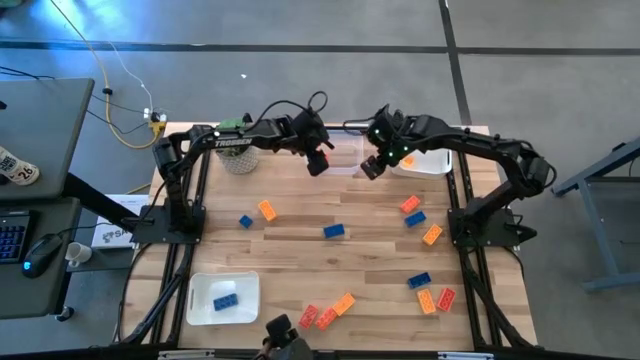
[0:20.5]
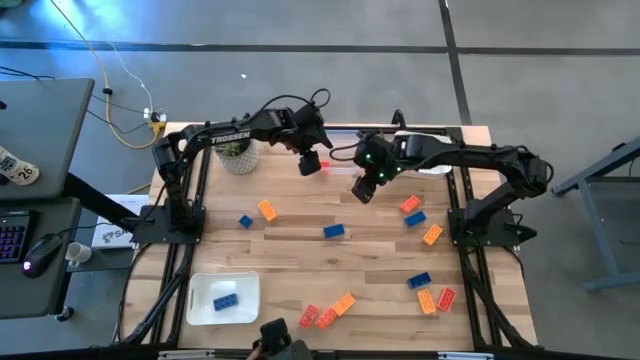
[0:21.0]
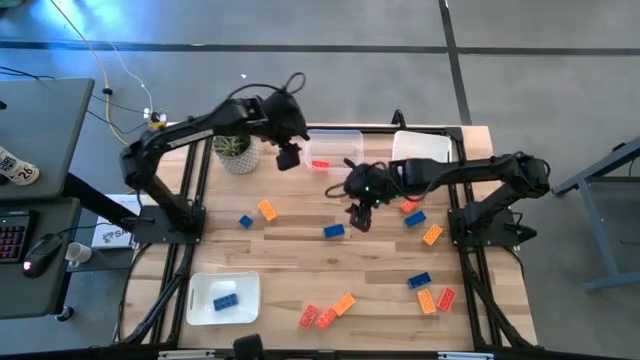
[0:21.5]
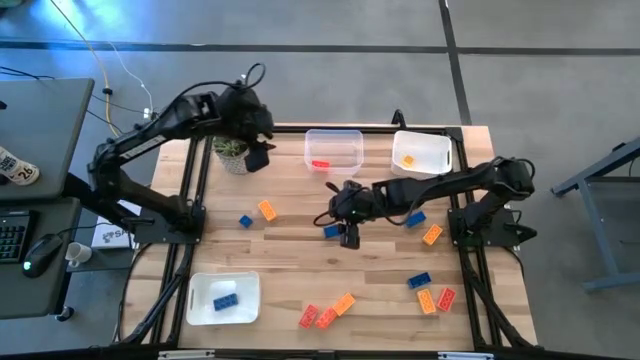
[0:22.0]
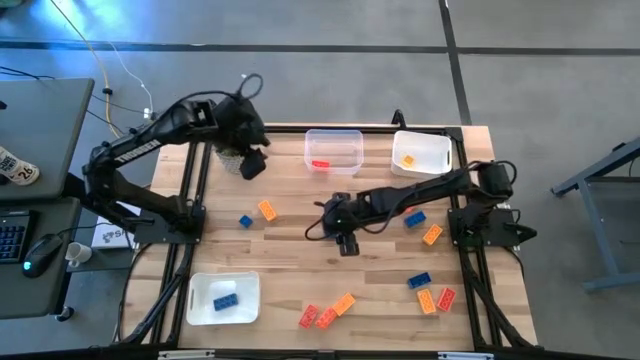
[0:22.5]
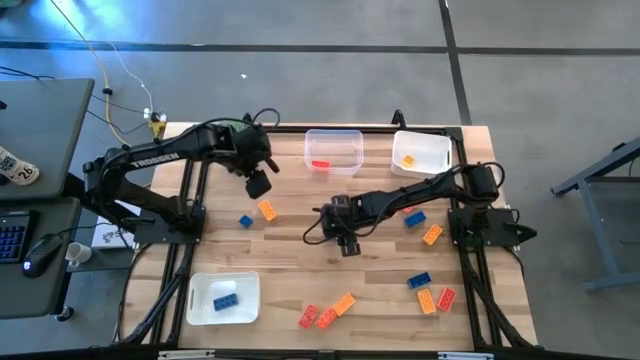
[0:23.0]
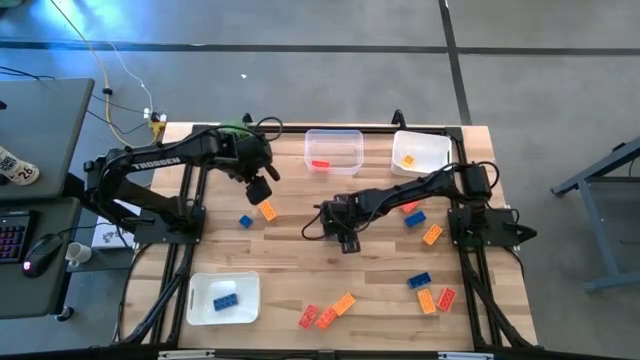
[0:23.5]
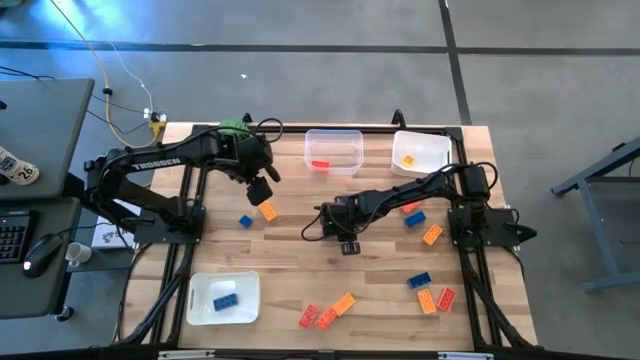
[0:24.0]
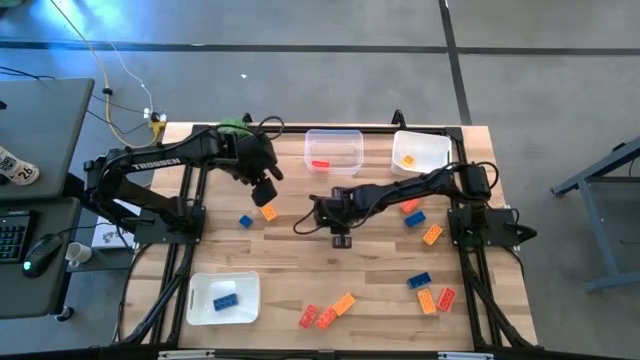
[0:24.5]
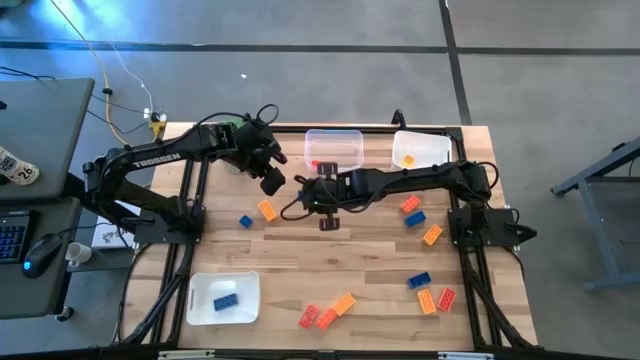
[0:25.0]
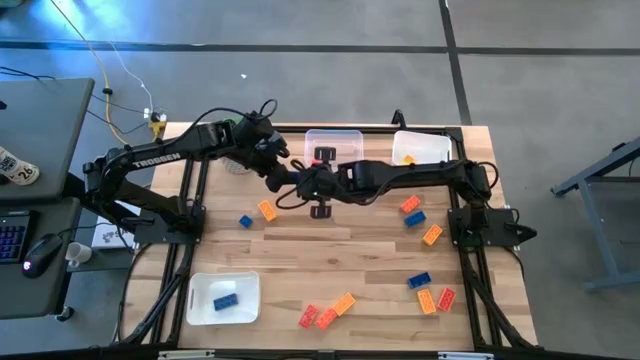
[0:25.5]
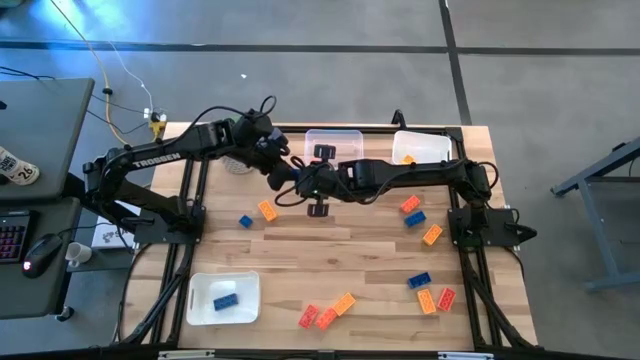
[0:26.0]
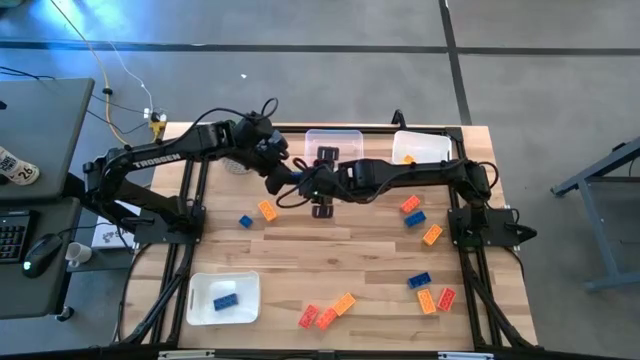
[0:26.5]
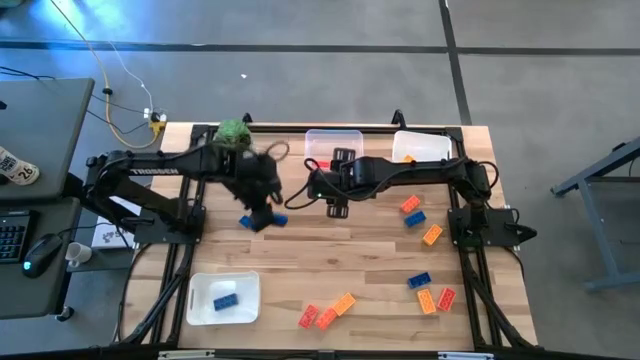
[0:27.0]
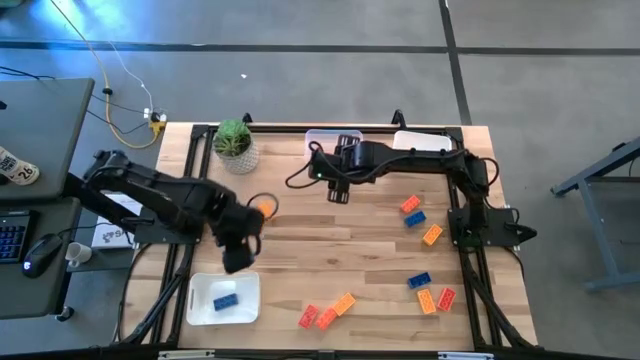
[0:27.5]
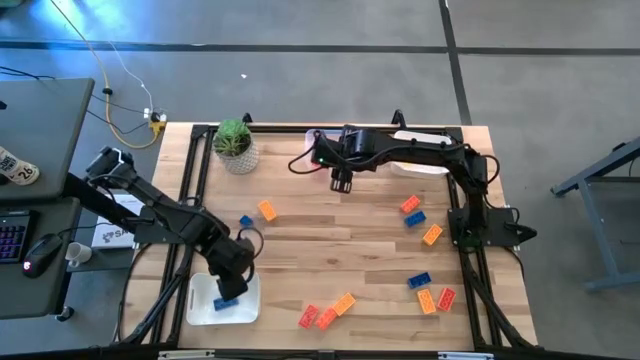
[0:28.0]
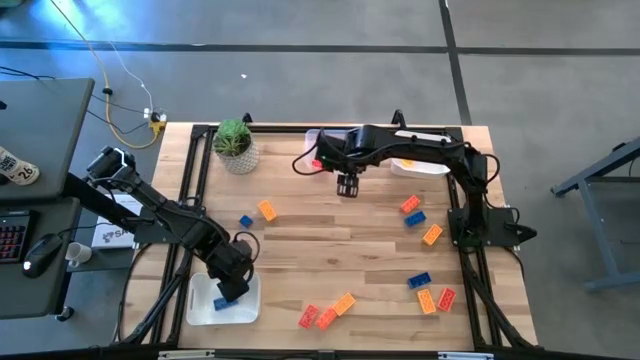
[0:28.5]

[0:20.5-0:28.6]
Task: Sort & place blocks by color
Put the blue game piece into the bottom white bin

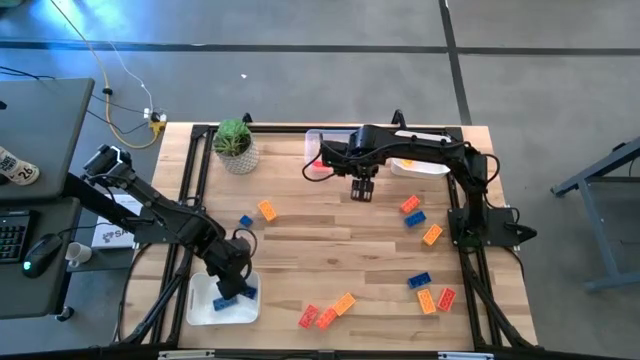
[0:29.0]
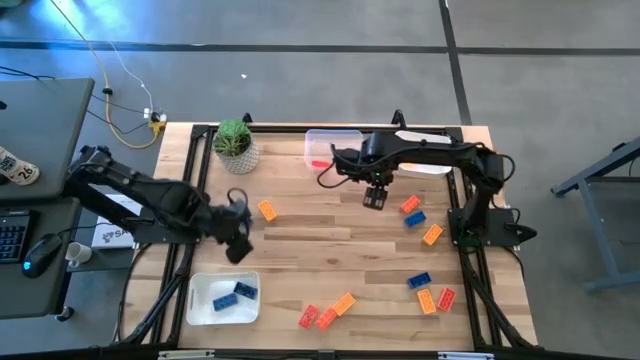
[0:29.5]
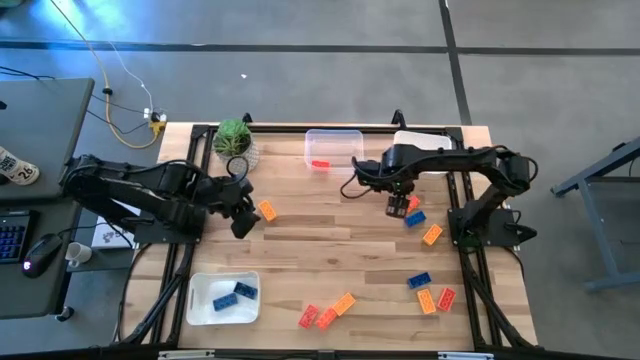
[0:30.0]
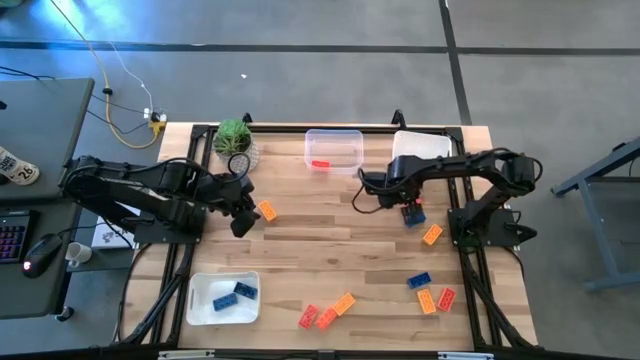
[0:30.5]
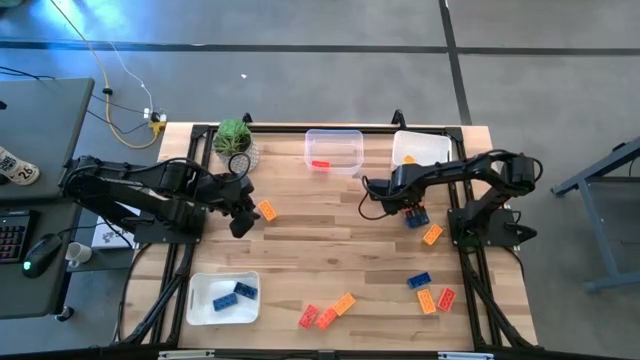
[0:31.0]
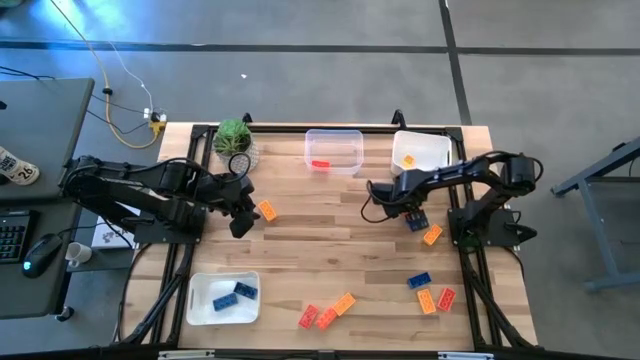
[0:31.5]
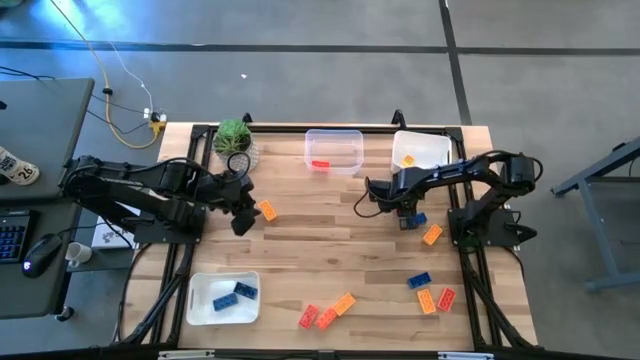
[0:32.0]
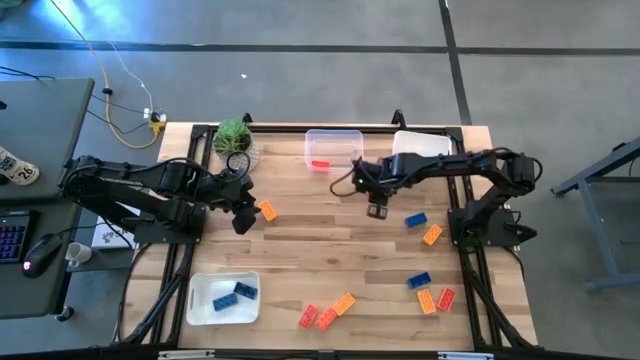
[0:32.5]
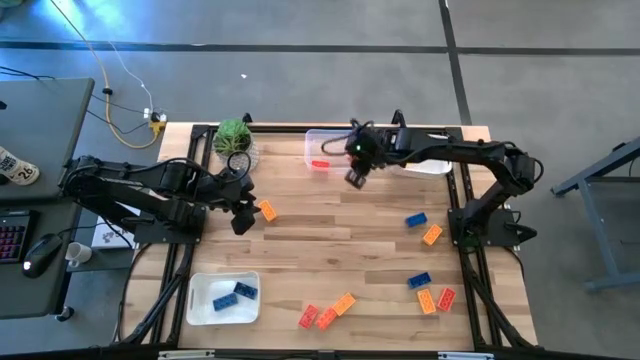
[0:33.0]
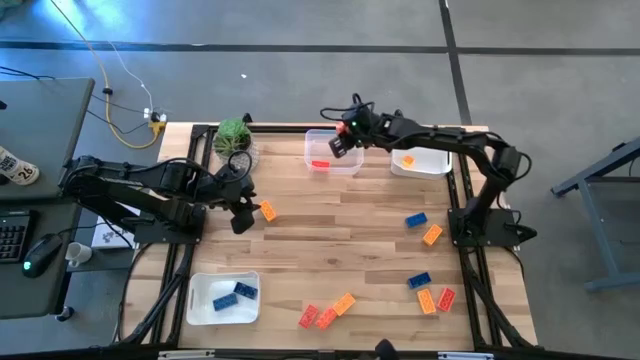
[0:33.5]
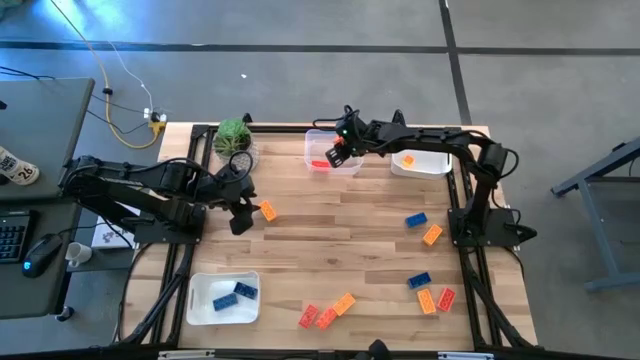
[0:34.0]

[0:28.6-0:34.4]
Put the orange game piece into the transparent bin

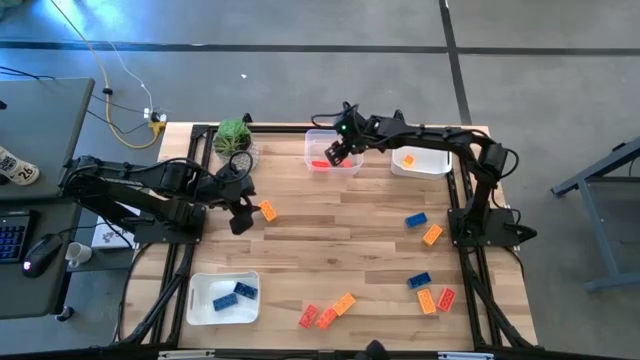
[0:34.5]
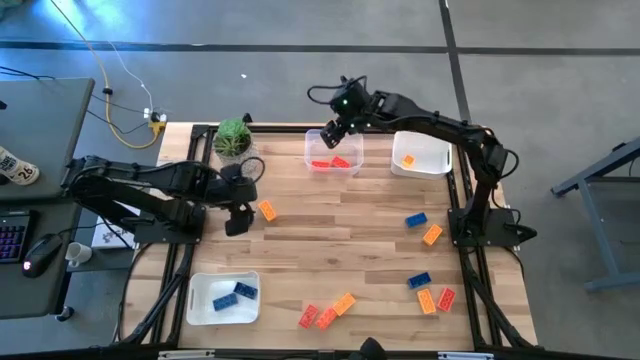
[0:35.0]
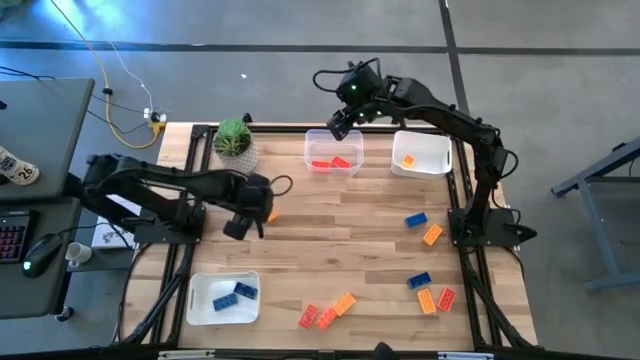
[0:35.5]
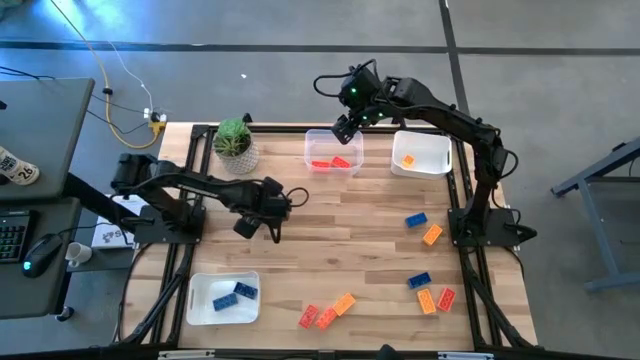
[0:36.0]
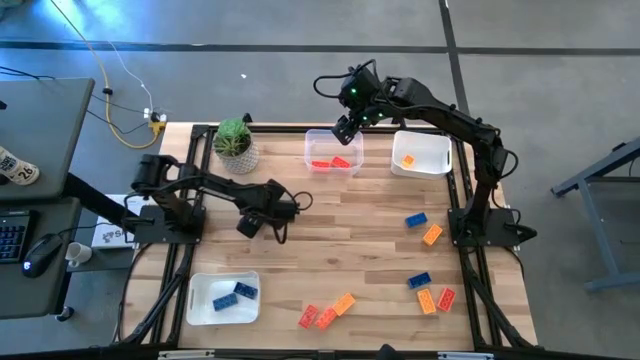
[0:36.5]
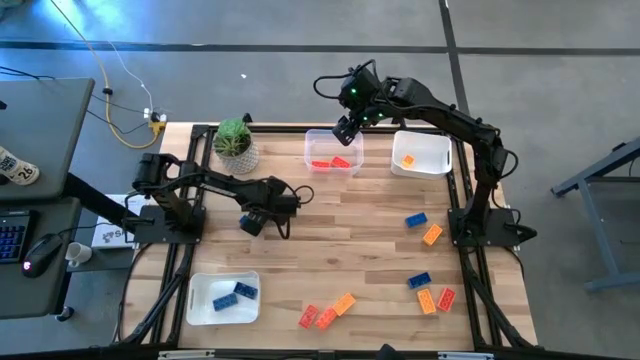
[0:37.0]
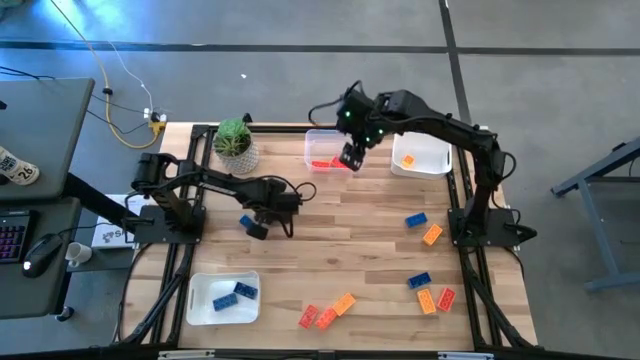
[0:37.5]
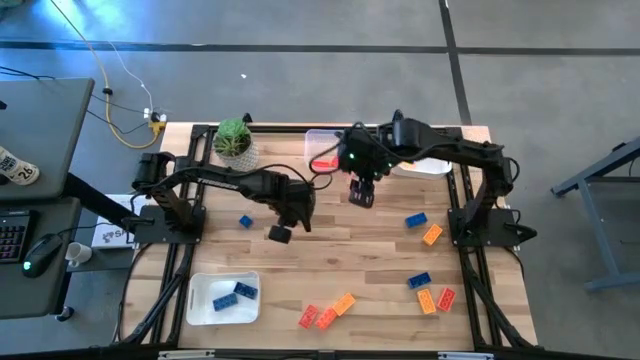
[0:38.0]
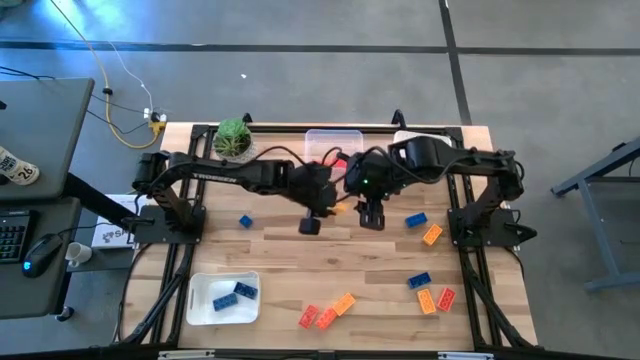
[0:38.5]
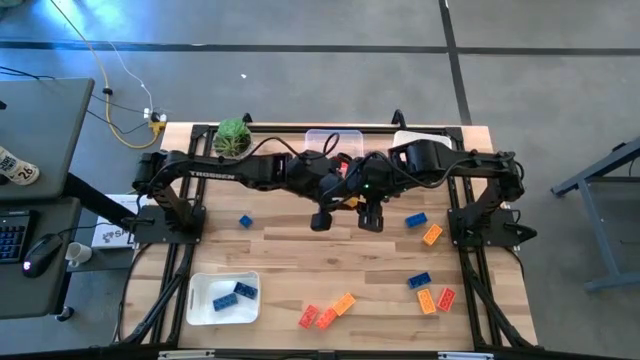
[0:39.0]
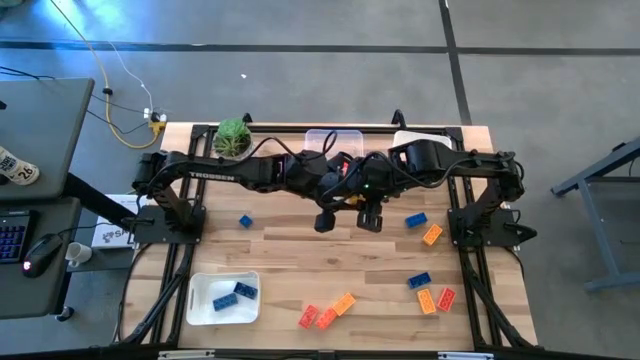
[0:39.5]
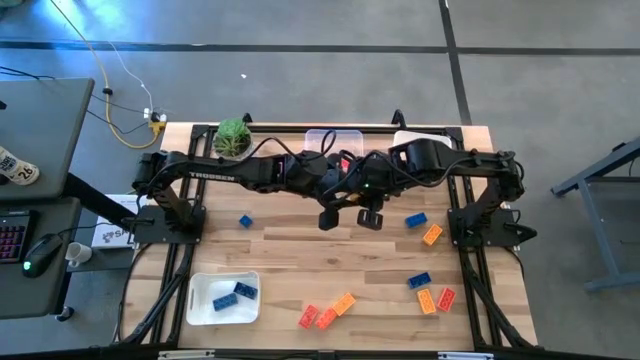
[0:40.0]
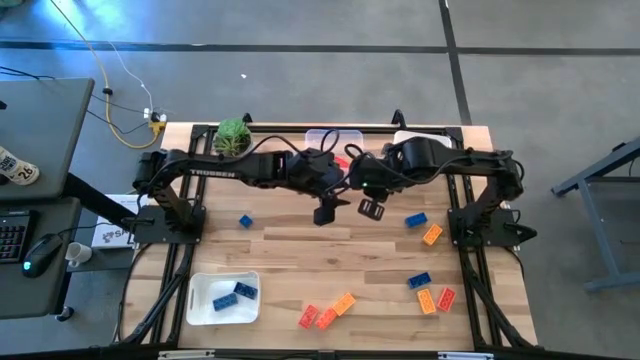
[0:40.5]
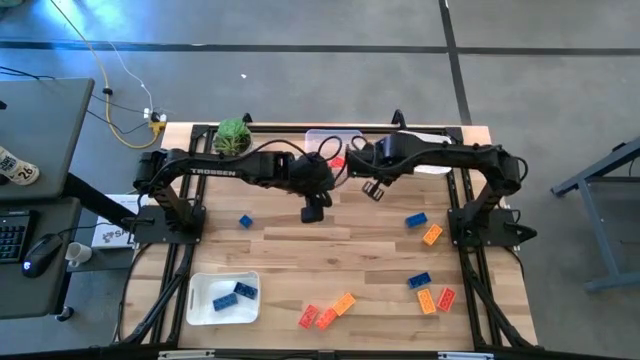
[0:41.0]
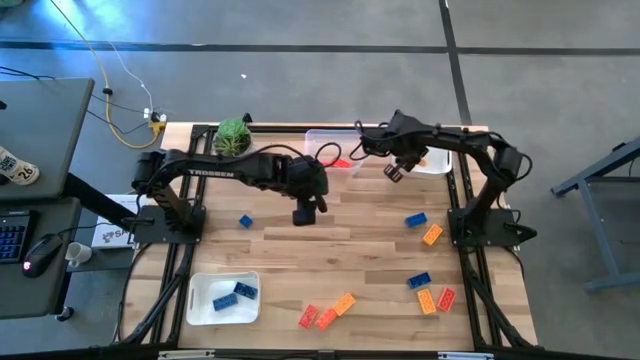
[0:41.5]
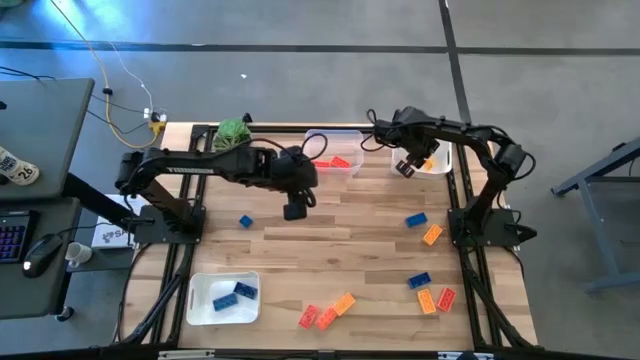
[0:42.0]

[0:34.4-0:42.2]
Put the yellow game piece into the top white bin
